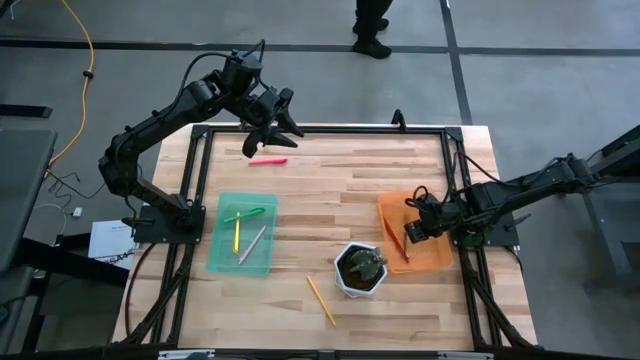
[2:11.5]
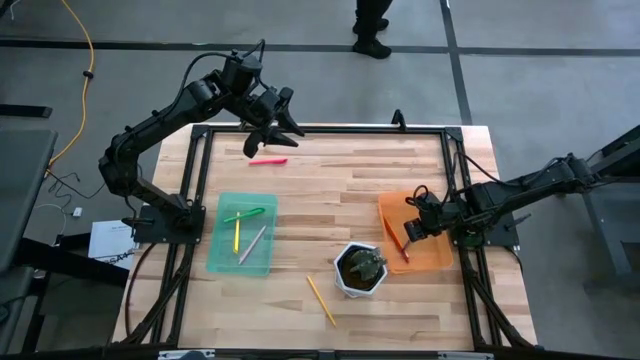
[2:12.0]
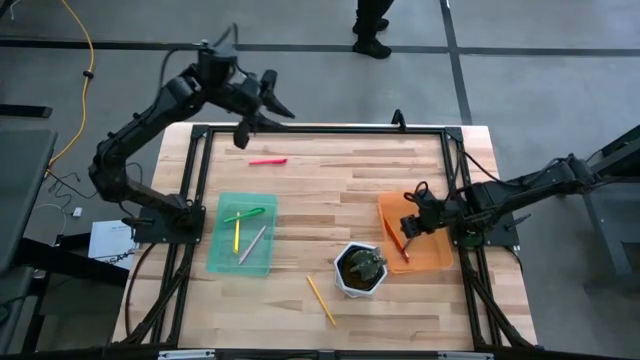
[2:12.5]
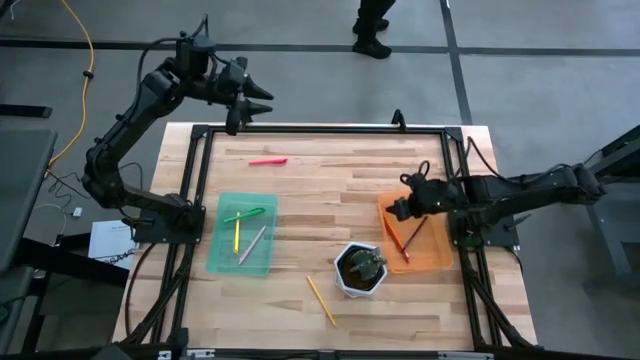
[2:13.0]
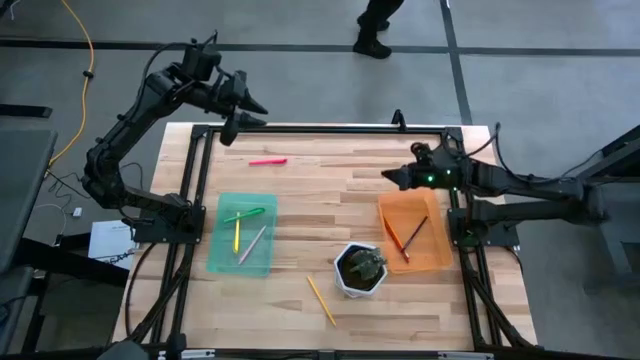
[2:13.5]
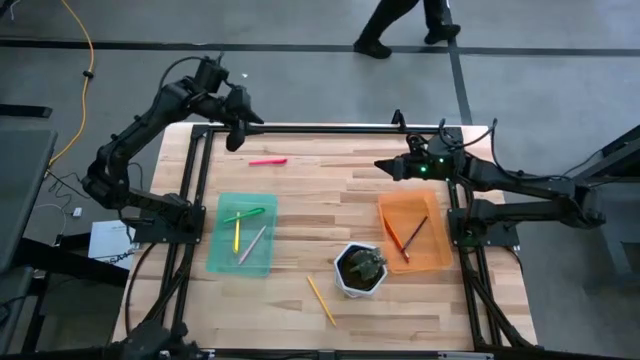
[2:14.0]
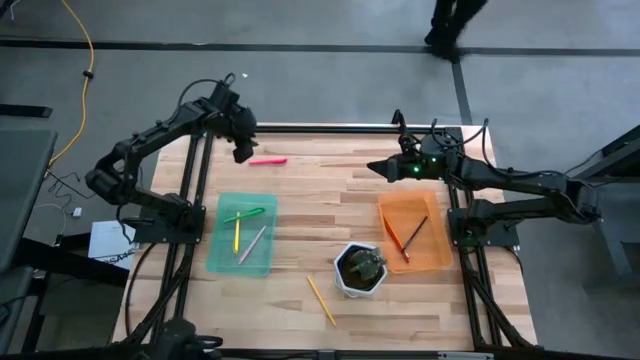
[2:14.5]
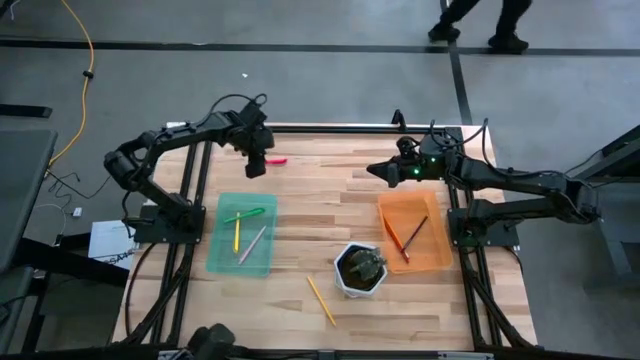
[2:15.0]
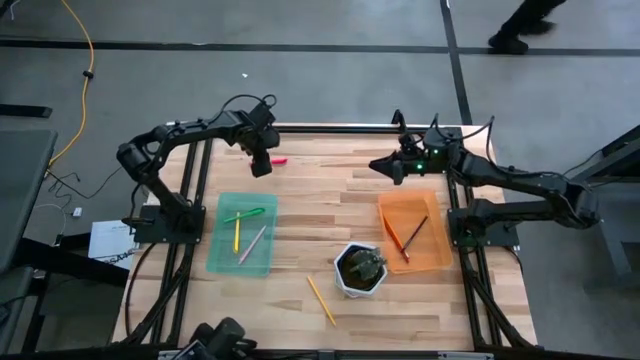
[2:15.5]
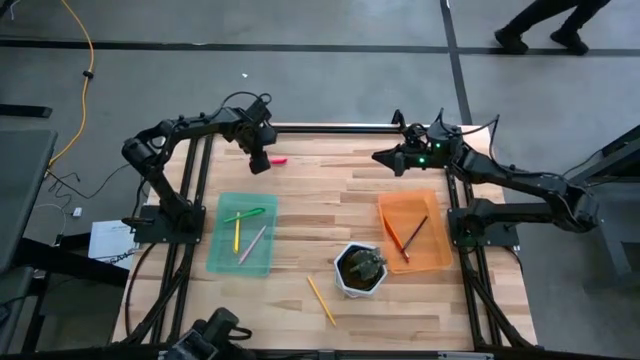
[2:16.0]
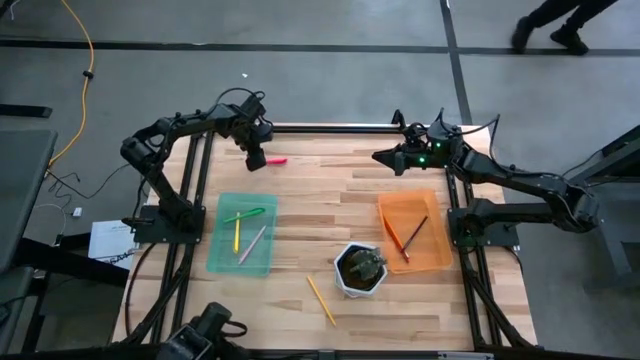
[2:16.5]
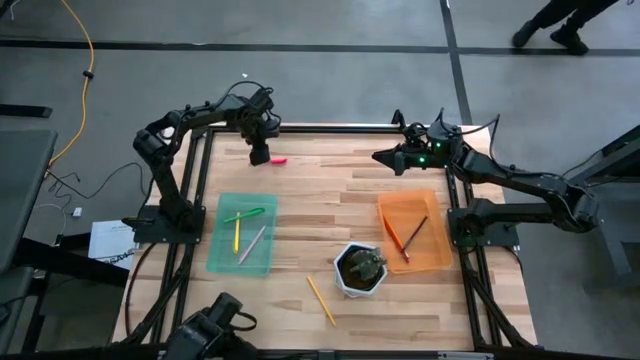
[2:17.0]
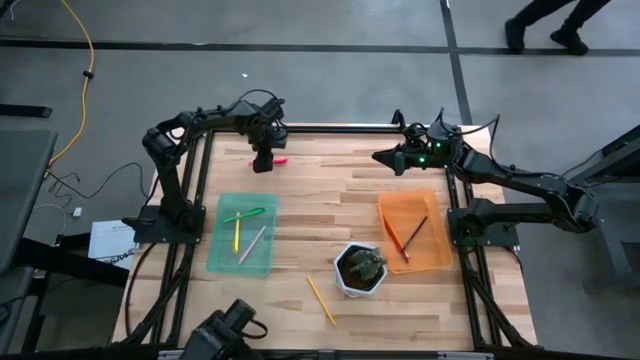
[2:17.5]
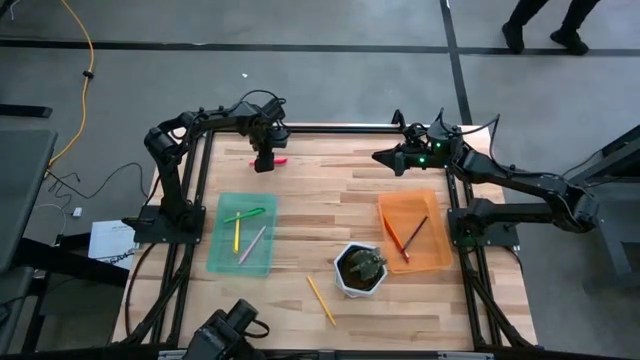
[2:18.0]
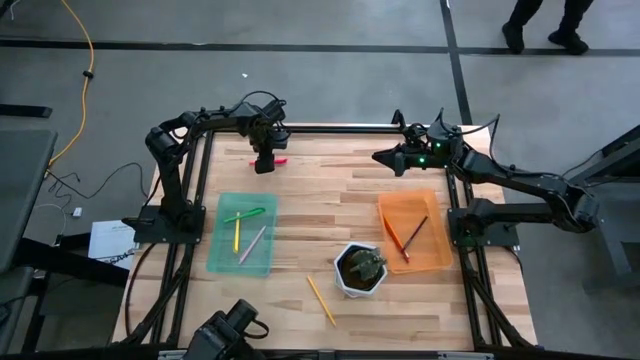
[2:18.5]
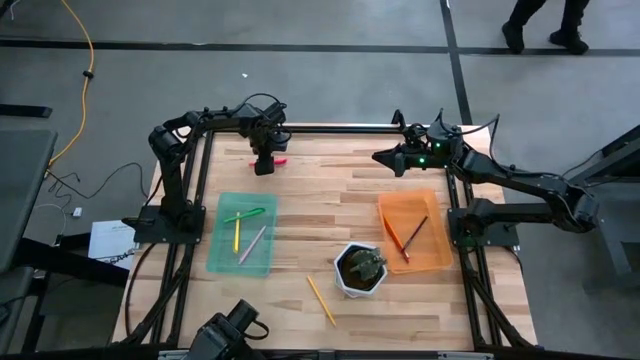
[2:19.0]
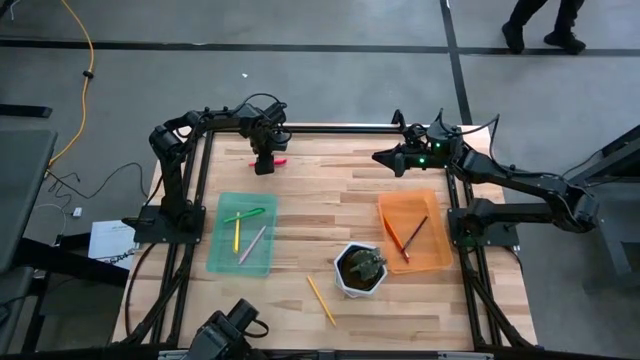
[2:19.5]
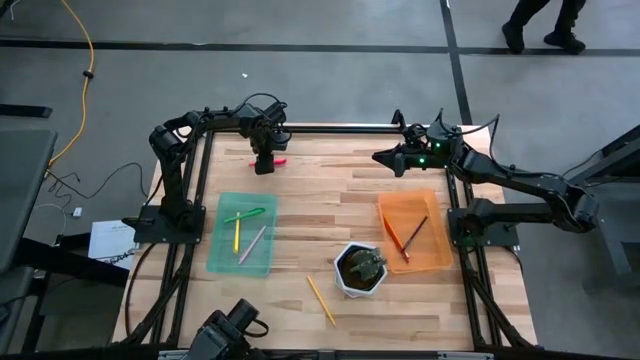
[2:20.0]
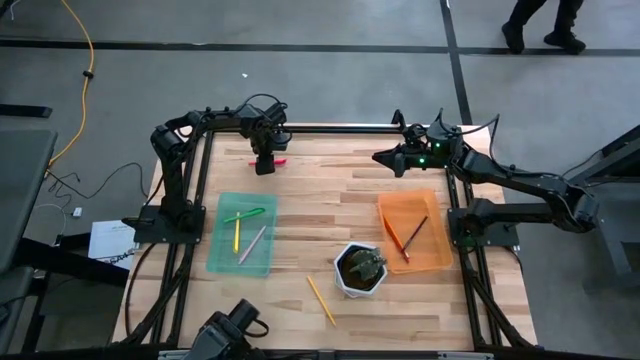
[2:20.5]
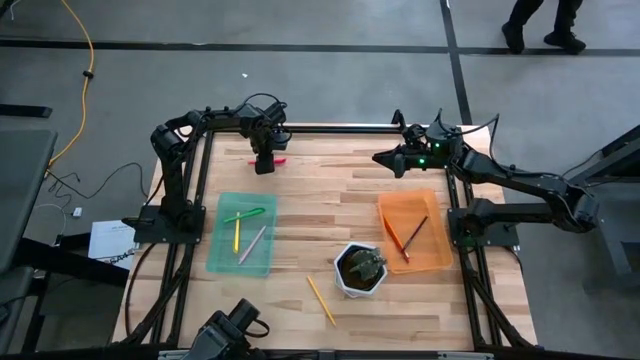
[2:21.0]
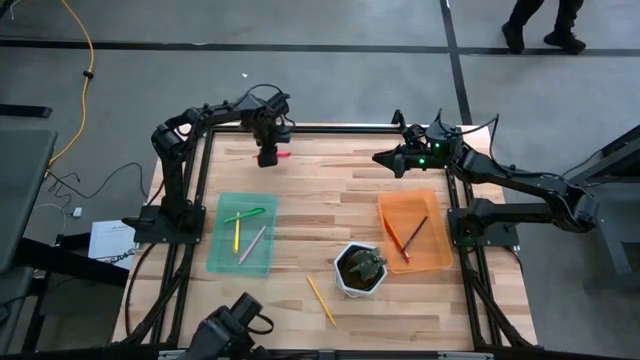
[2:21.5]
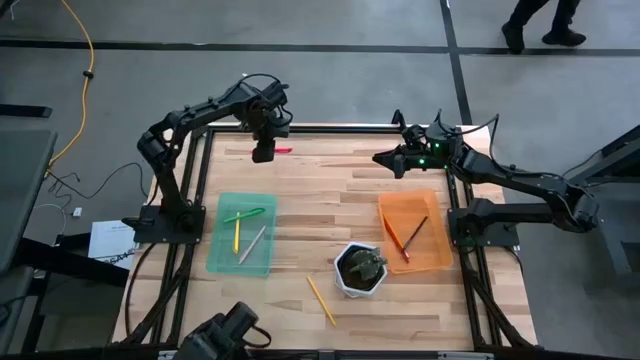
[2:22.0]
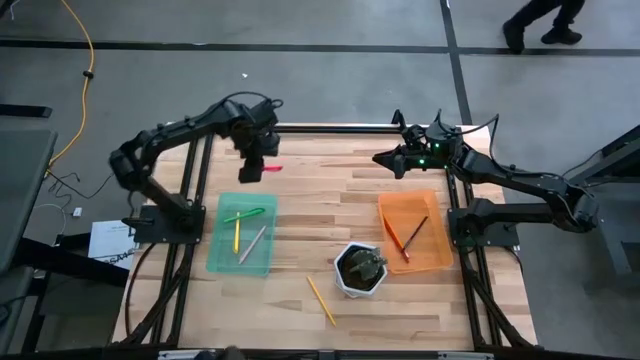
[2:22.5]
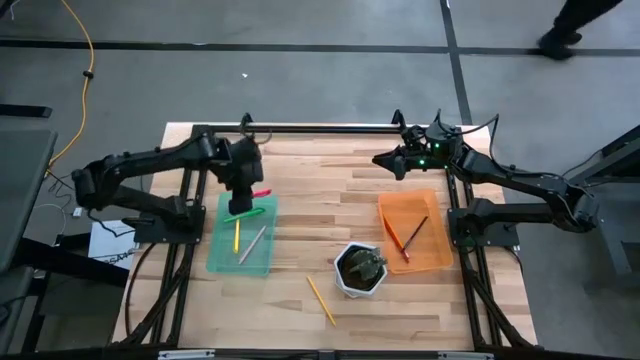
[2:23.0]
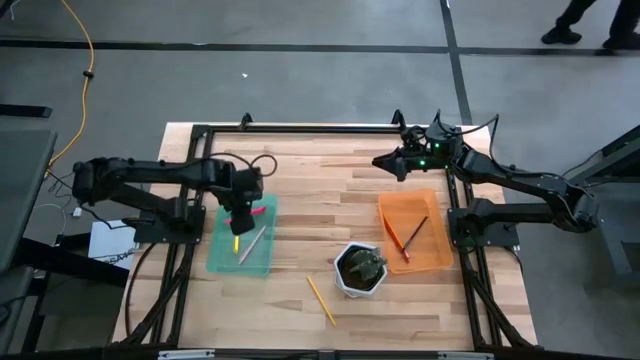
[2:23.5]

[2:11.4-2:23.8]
Task: Sort pens & pencils
Put the dark pink pen into the green bin

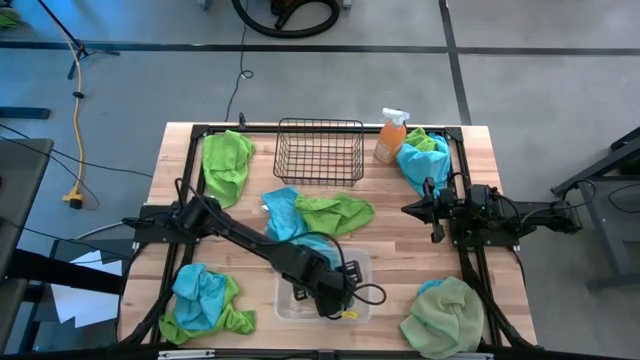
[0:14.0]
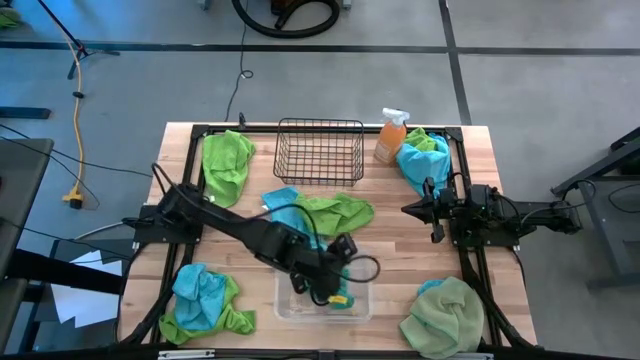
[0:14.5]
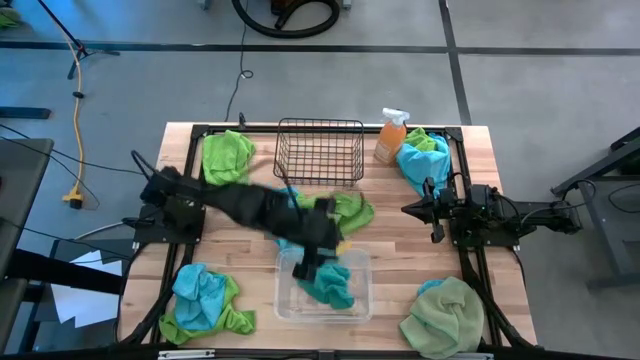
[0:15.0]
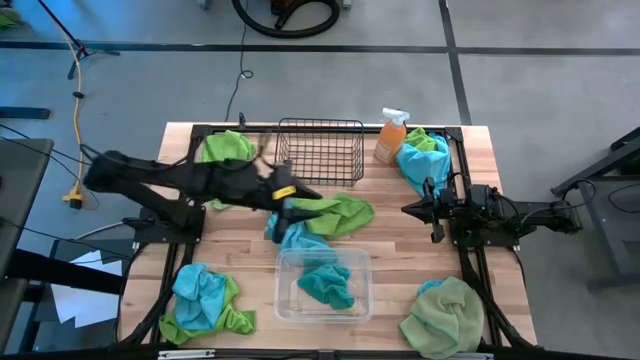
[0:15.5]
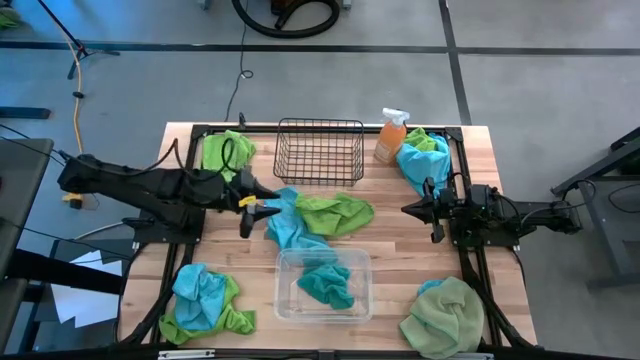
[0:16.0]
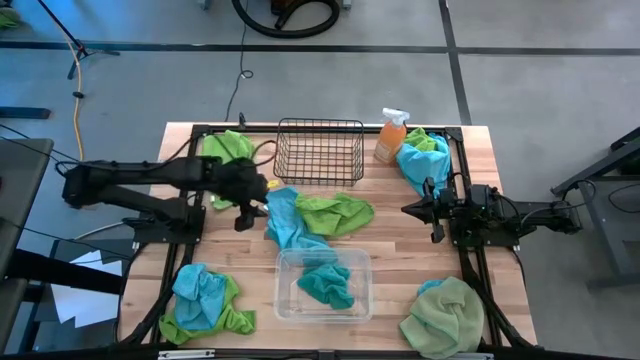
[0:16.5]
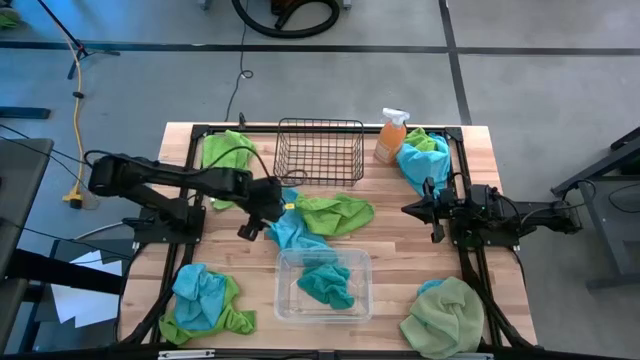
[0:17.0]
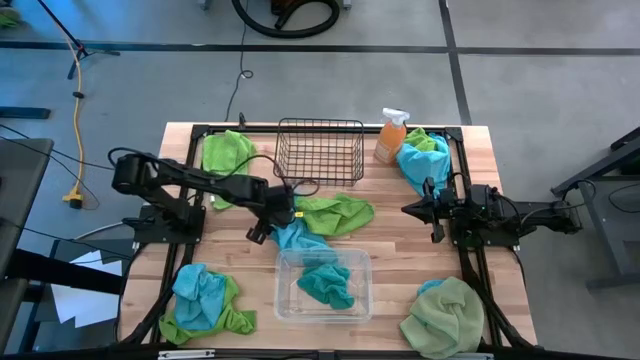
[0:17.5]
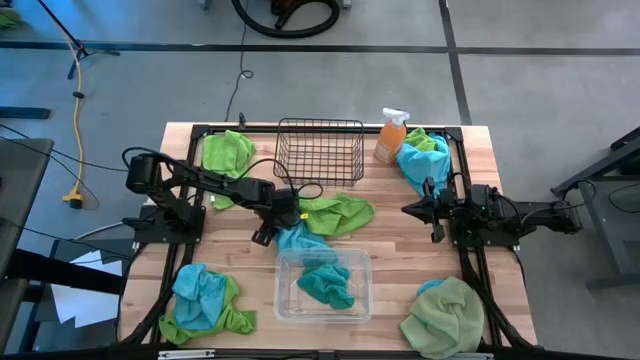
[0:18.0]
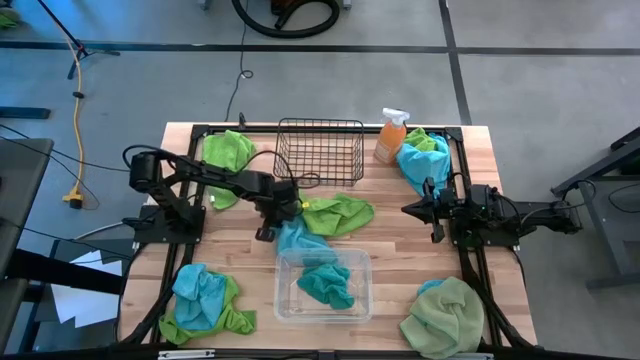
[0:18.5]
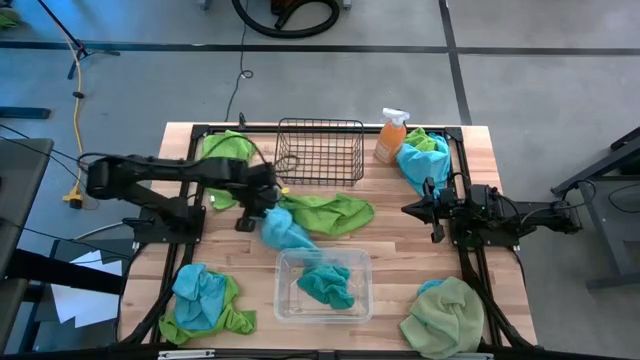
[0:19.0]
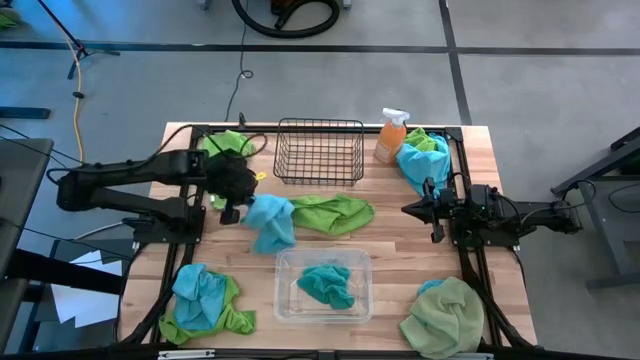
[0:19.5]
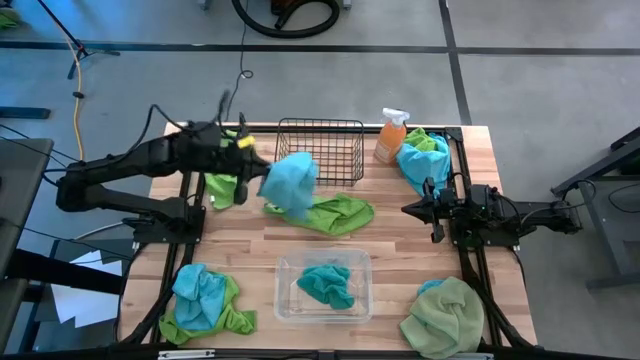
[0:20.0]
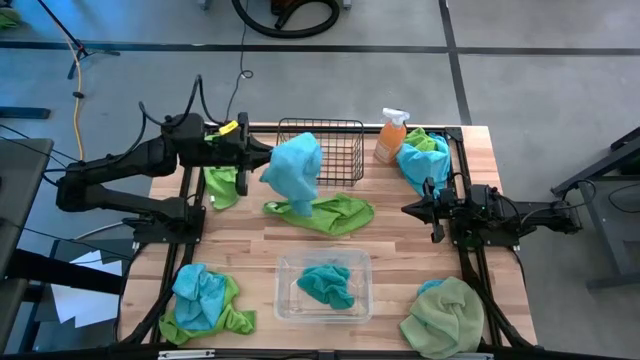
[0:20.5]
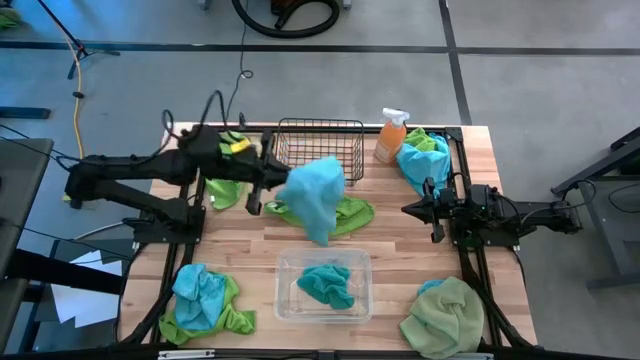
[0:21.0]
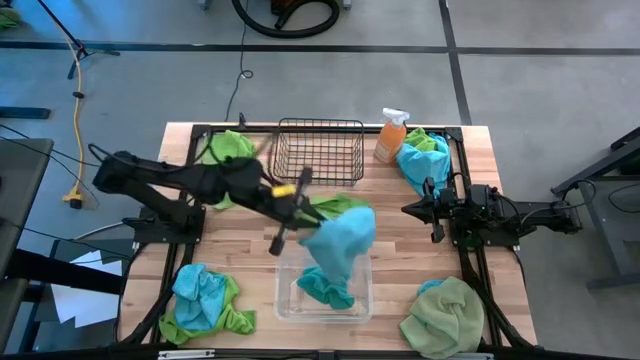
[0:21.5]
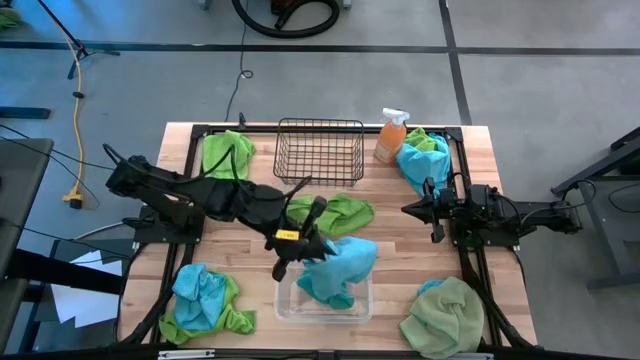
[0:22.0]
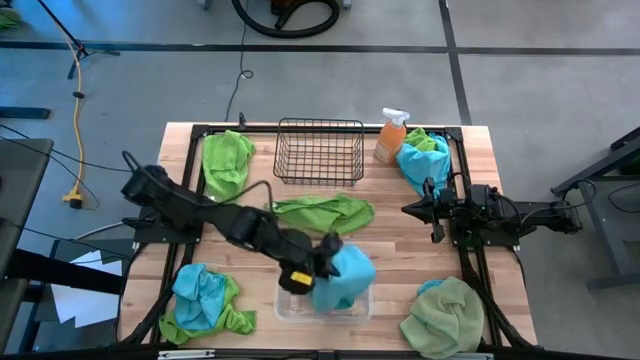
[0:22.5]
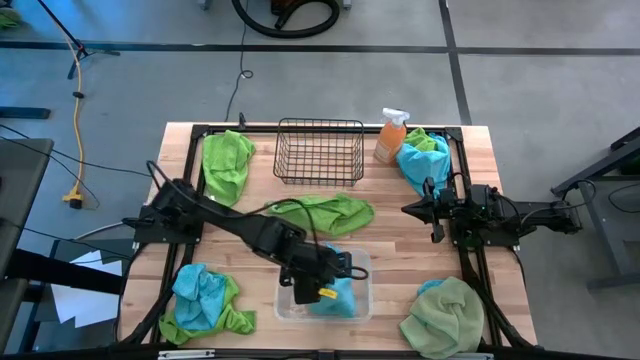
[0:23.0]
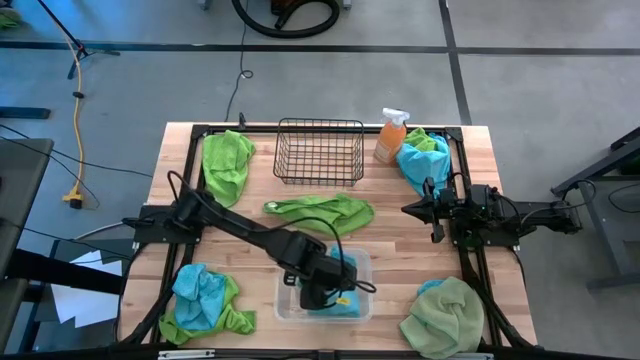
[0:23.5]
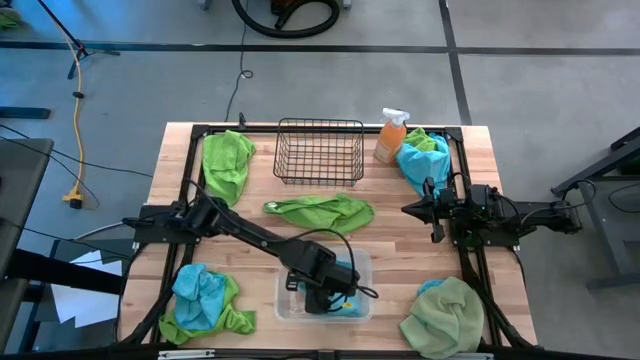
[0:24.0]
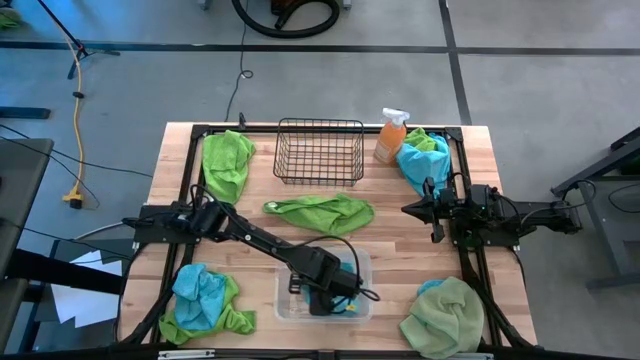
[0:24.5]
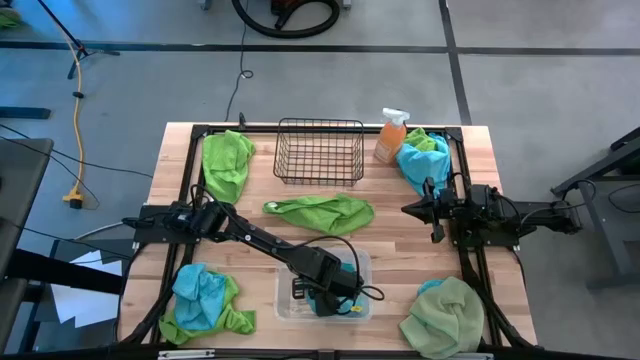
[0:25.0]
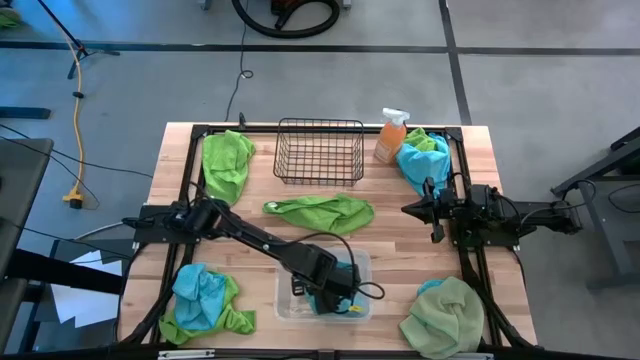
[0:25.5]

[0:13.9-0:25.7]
Task: Sort microfiber towel by color & place in baskets
Put the middle blue towel into the transparent bin
